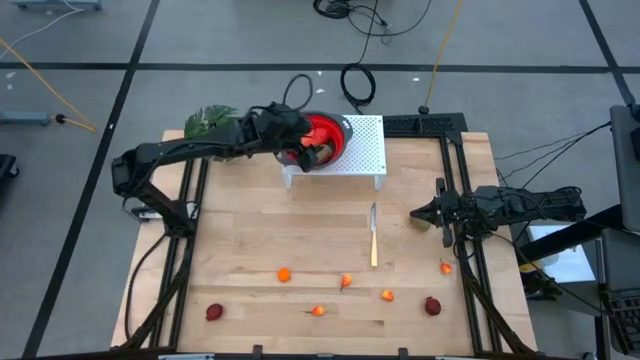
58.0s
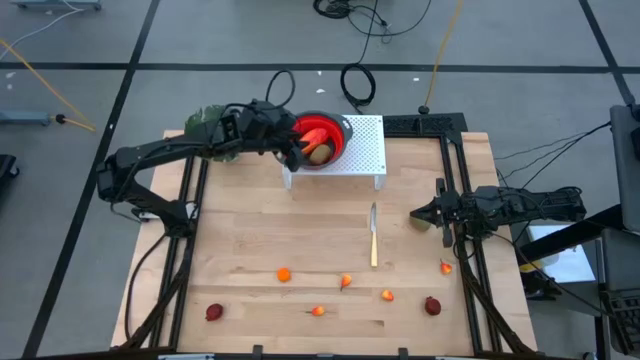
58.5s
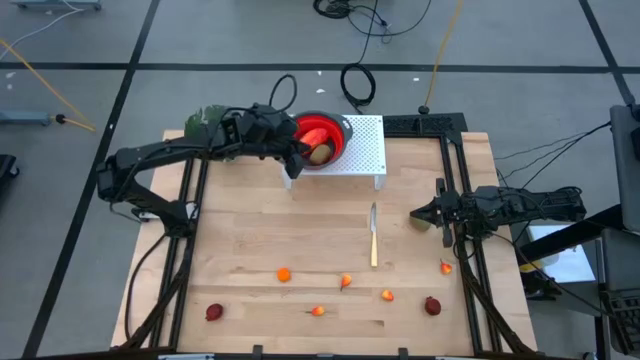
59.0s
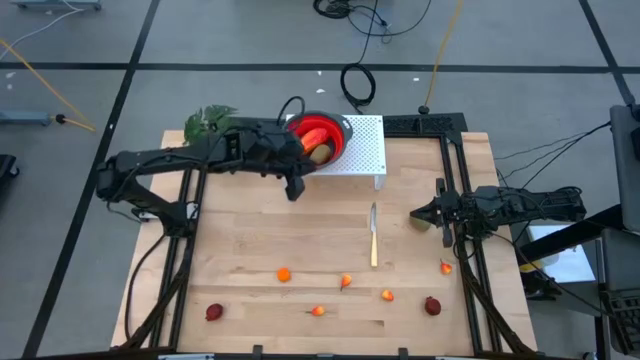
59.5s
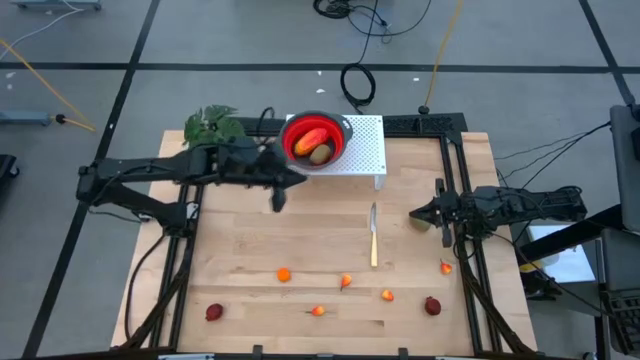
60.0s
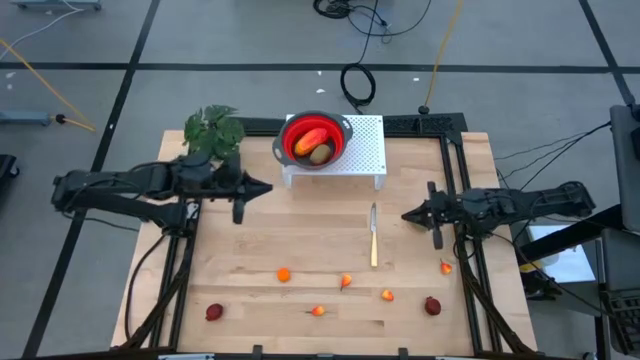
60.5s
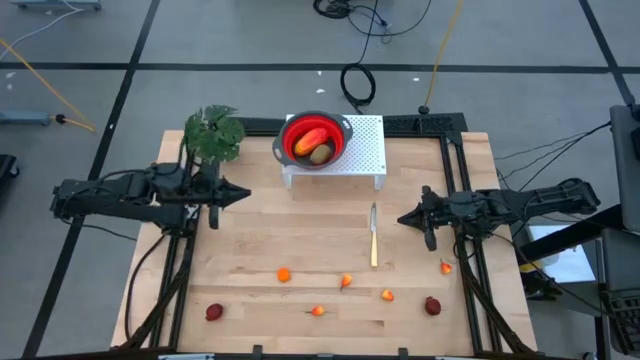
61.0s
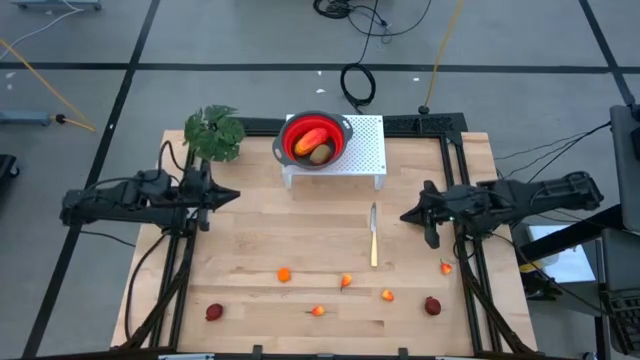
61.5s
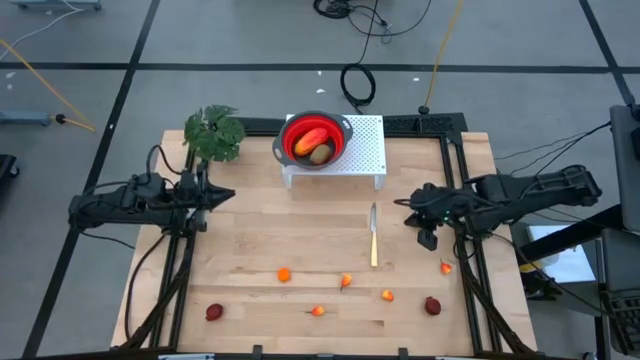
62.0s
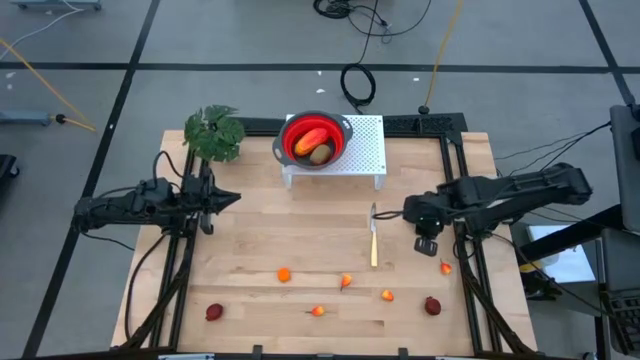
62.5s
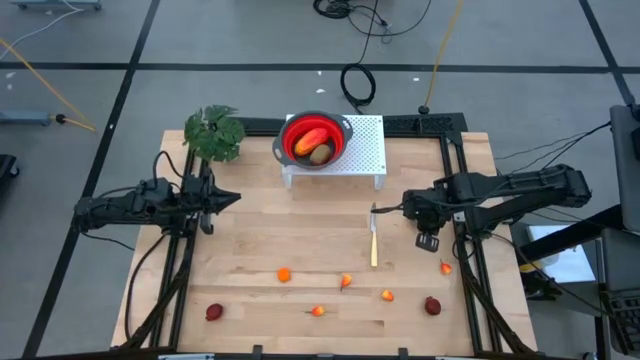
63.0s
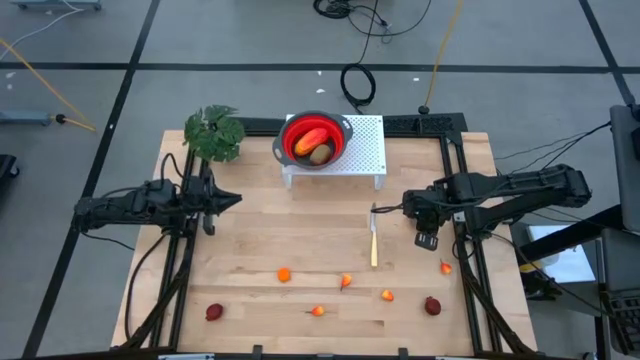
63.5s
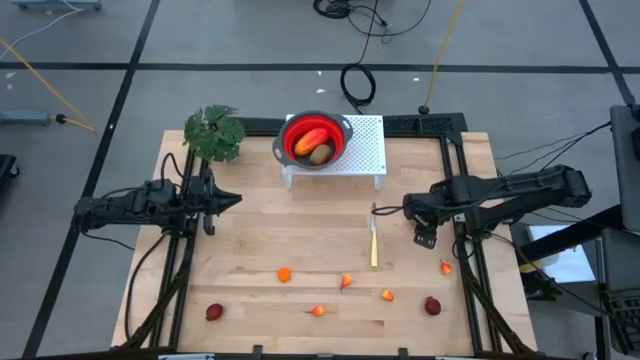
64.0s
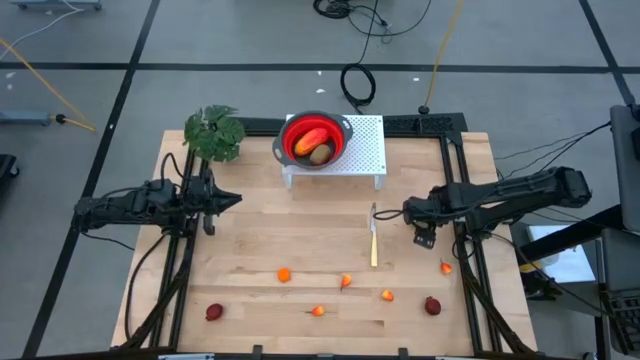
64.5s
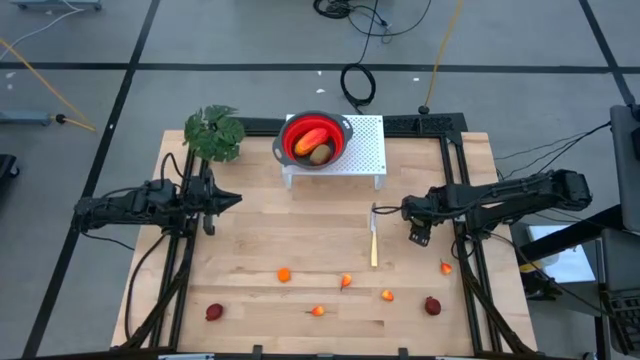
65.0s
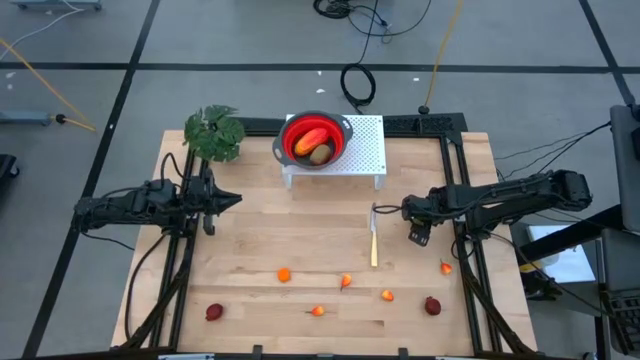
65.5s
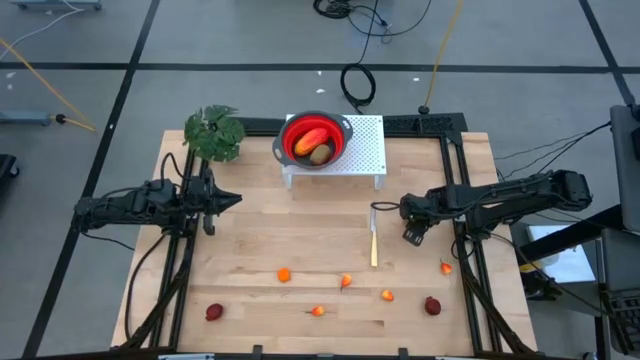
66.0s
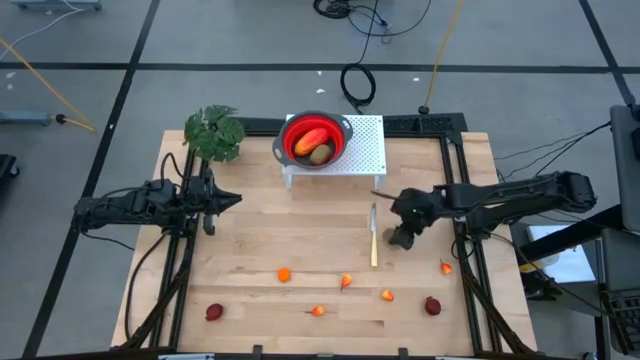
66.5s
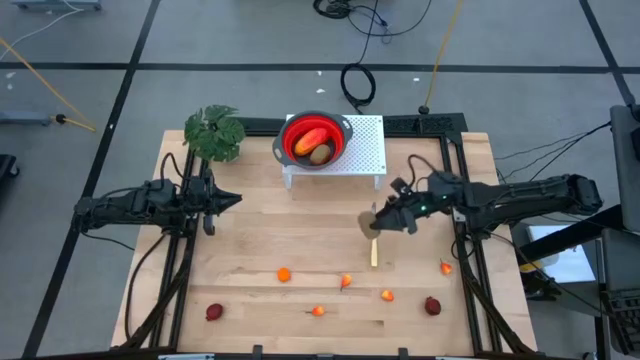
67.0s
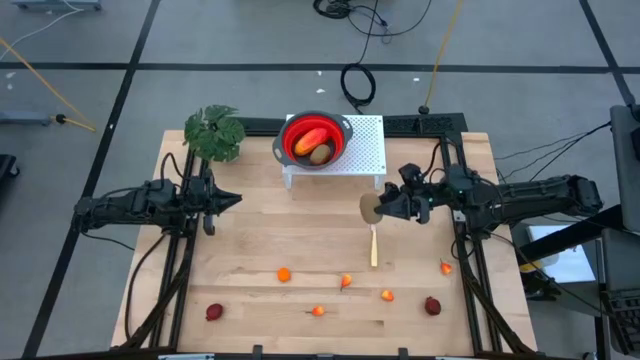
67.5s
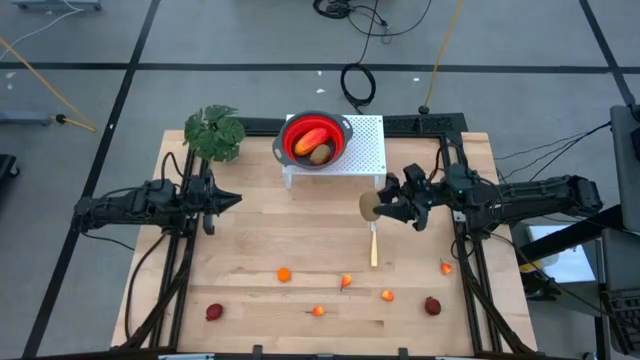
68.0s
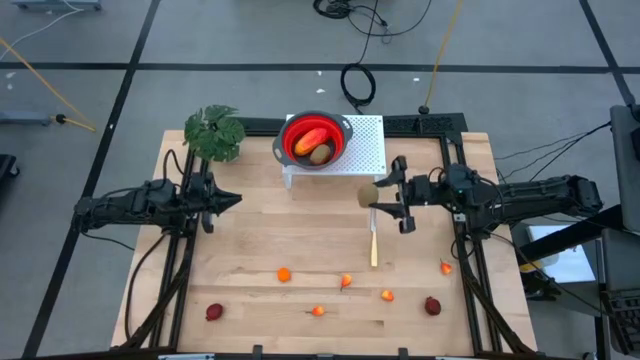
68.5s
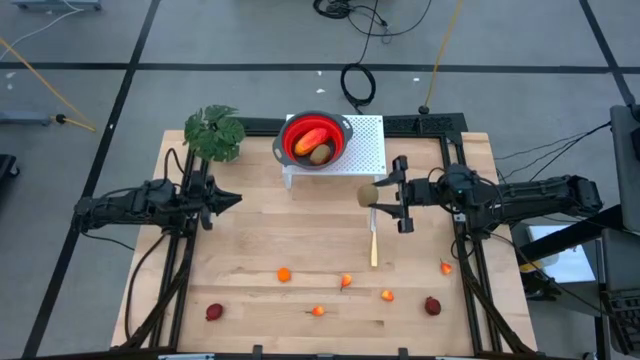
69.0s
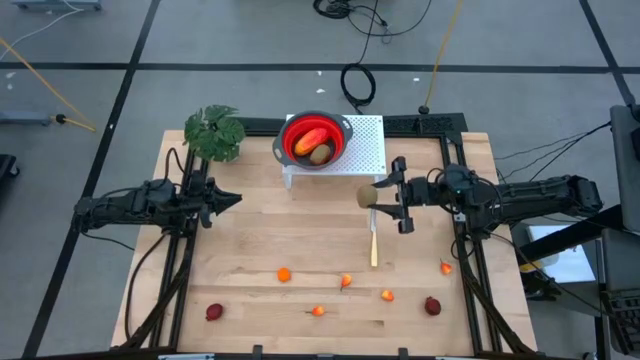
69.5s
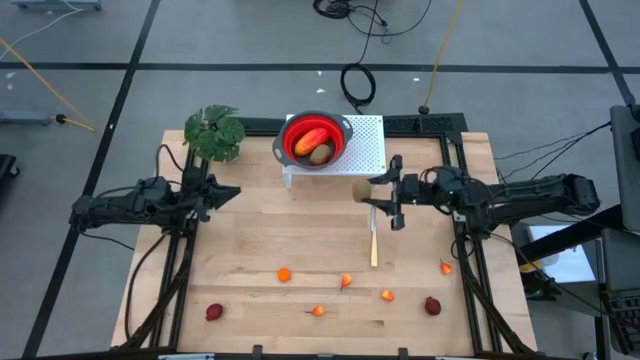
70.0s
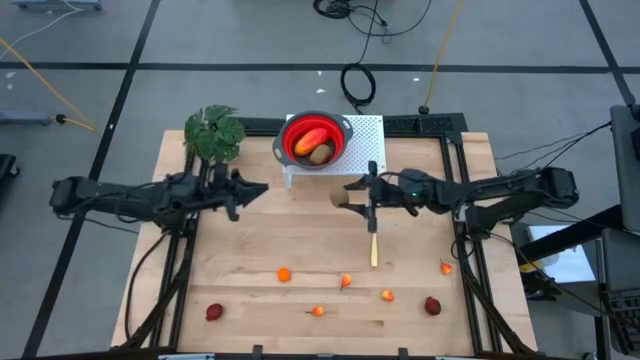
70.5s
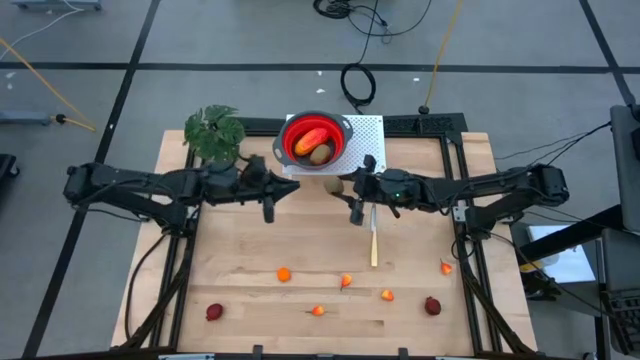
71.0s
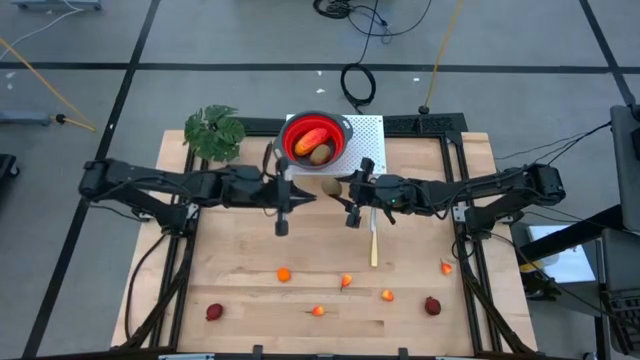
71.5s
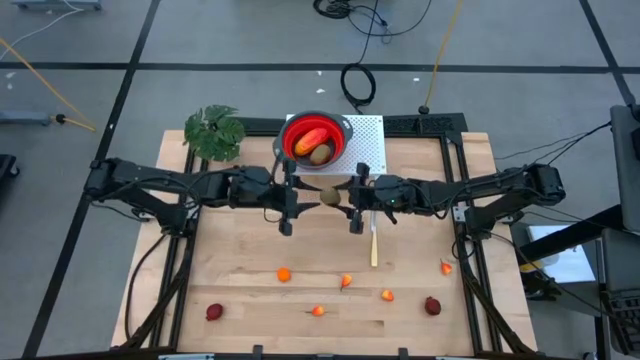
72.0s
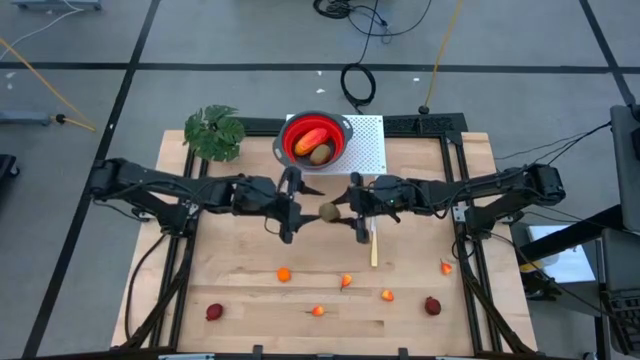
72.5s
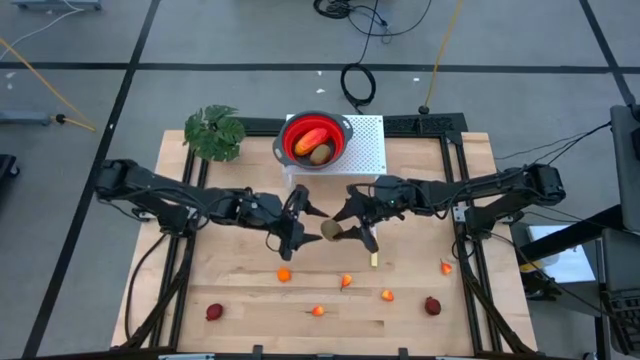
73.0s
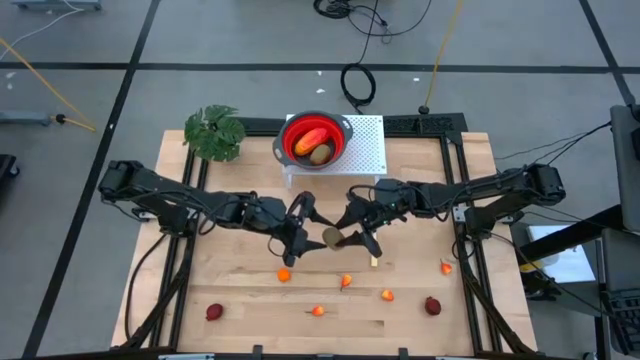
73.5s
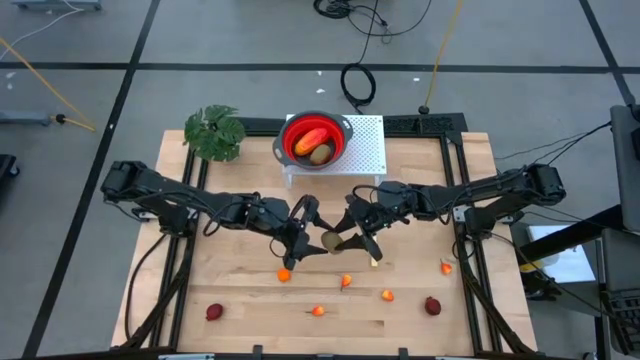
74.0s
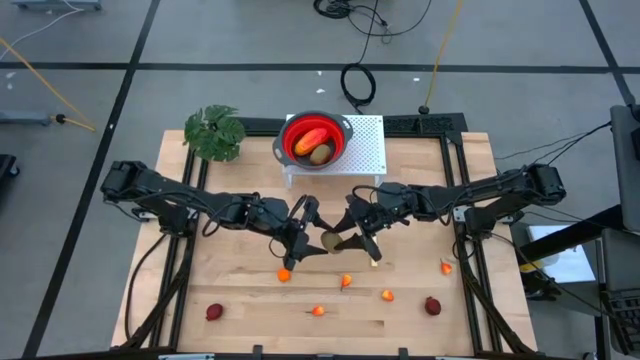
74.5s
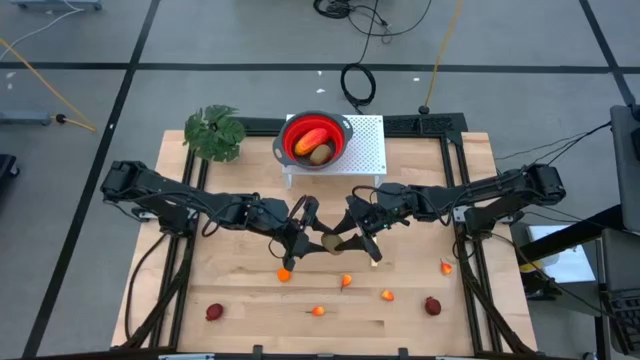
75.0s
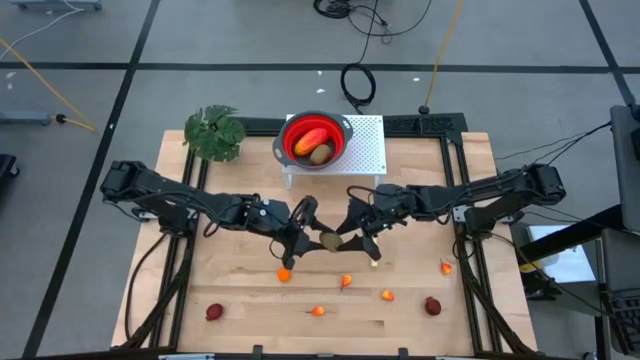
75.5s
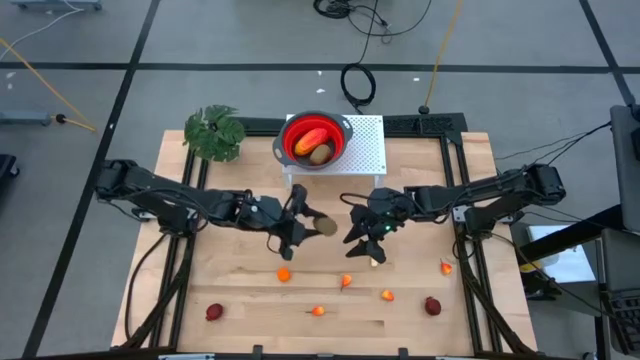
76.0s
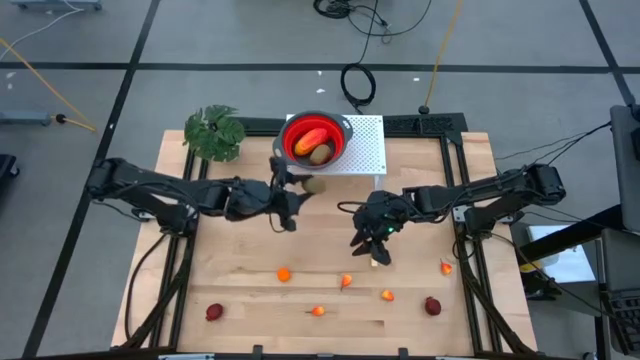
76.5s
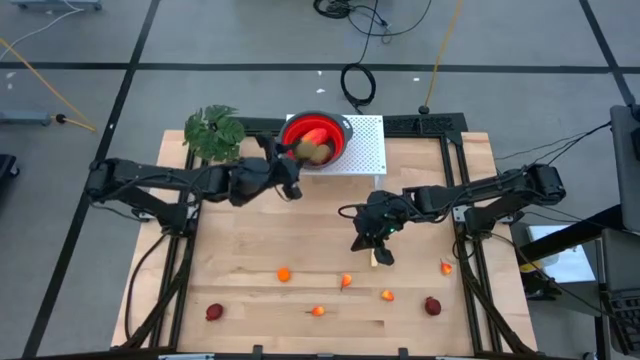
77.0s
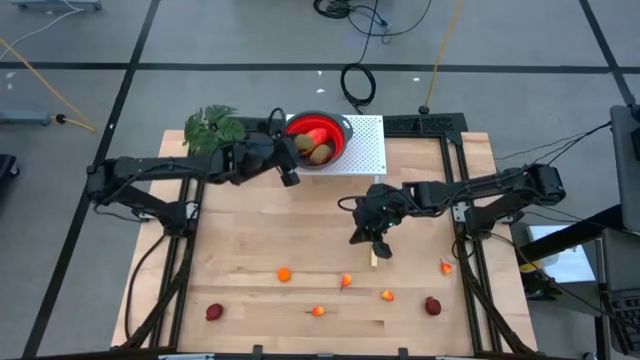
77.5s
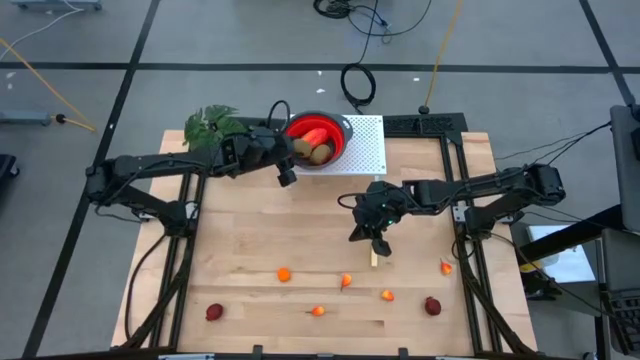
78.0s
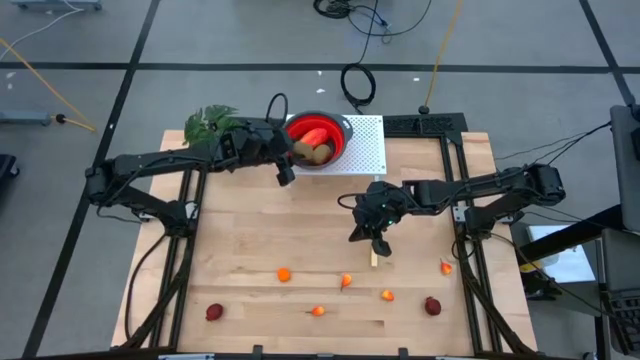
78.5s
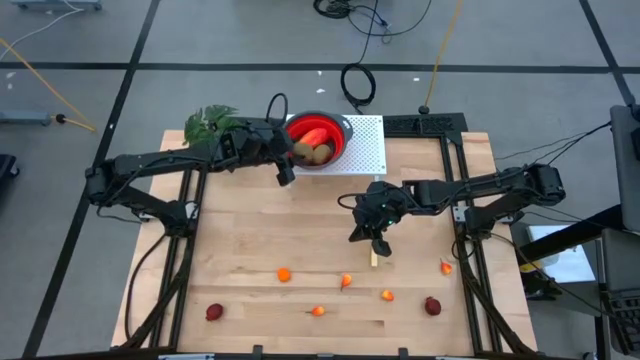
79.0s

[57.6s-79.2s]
Task: Pick & Place Fruit
Put the green kiwi into the red strainer bowl on the shelf
